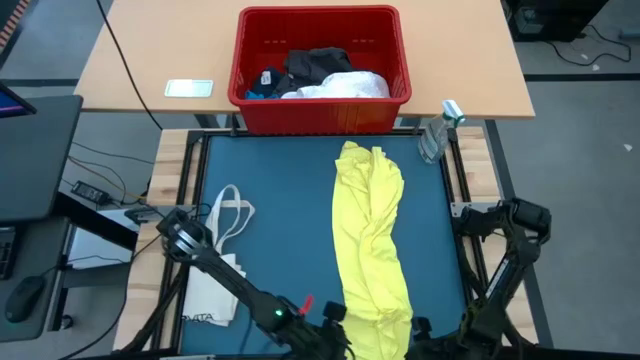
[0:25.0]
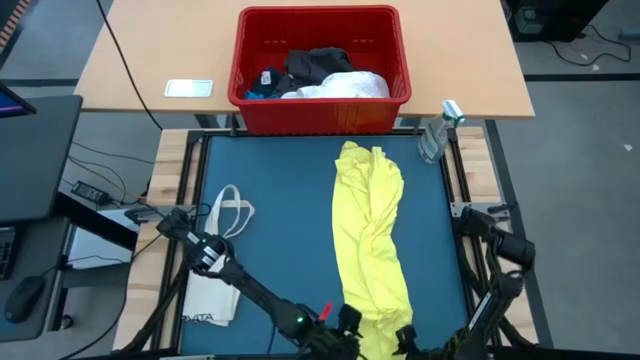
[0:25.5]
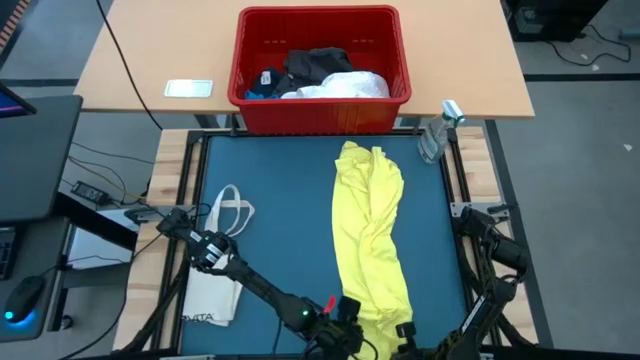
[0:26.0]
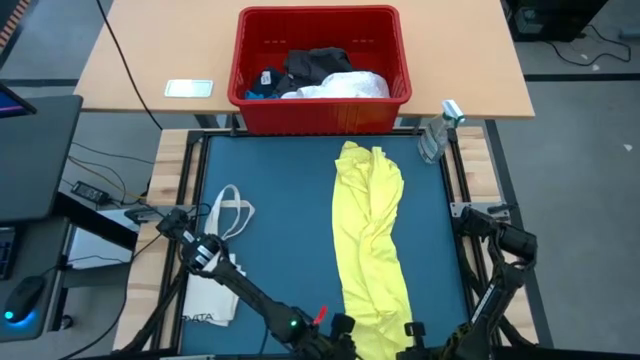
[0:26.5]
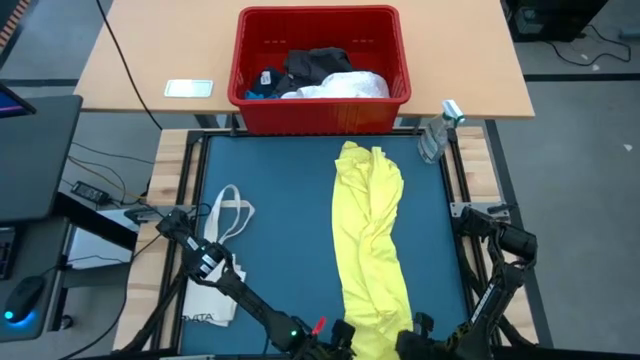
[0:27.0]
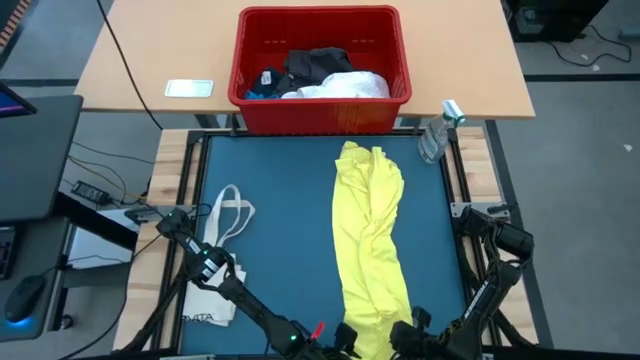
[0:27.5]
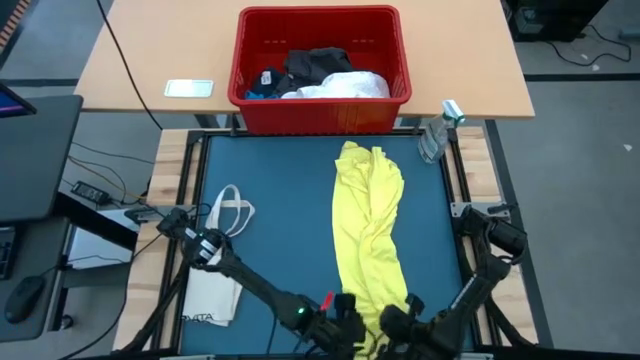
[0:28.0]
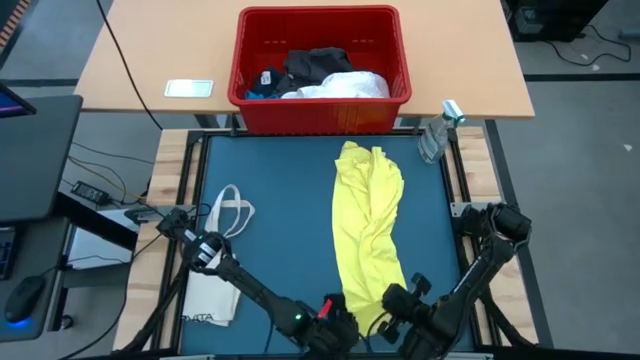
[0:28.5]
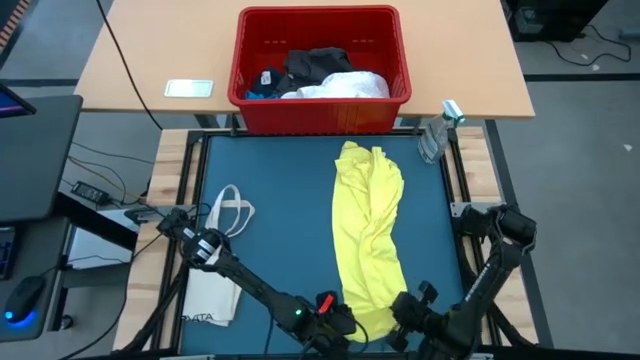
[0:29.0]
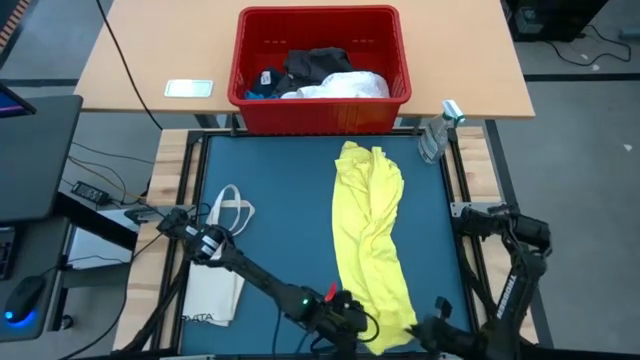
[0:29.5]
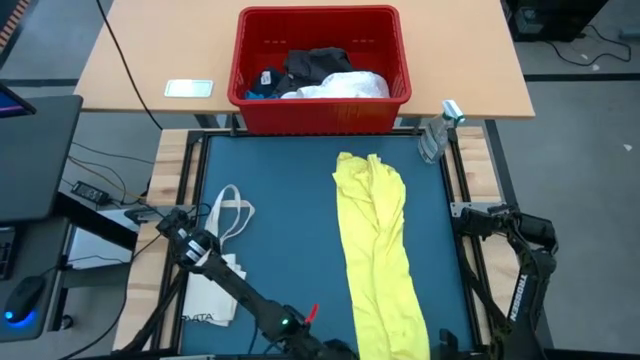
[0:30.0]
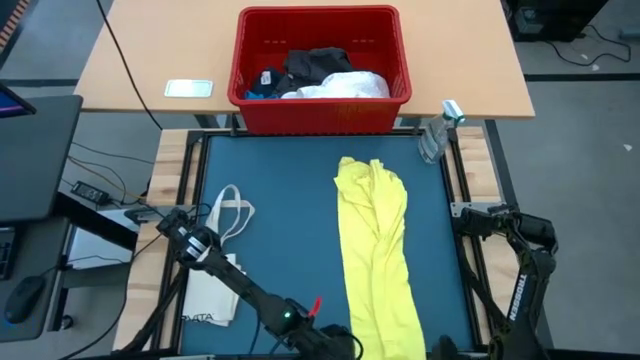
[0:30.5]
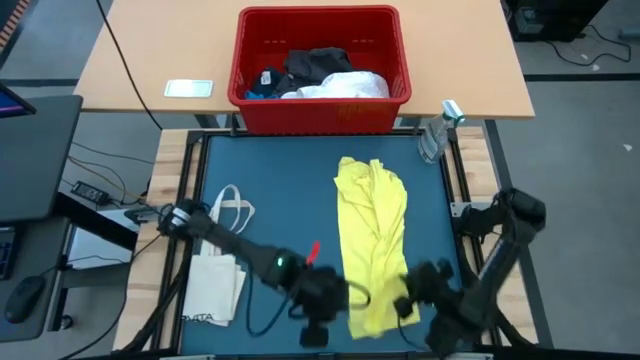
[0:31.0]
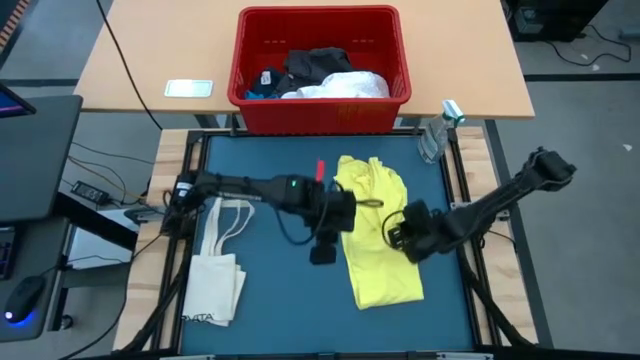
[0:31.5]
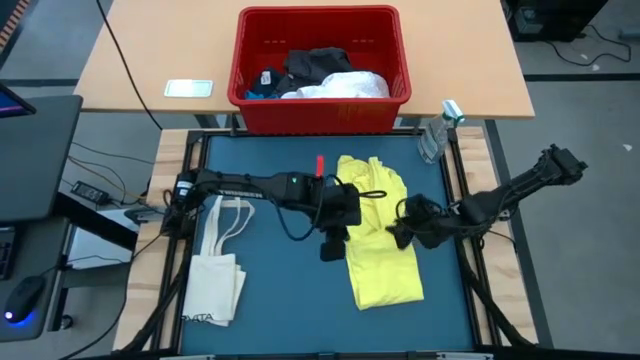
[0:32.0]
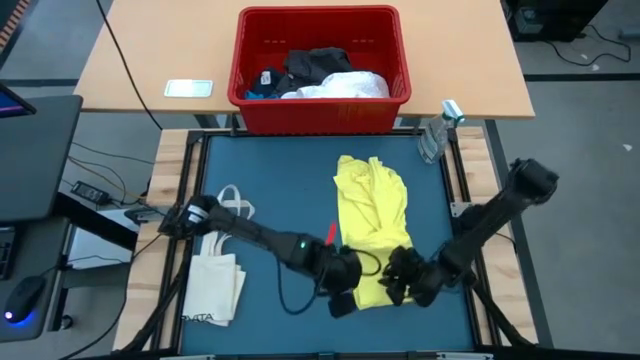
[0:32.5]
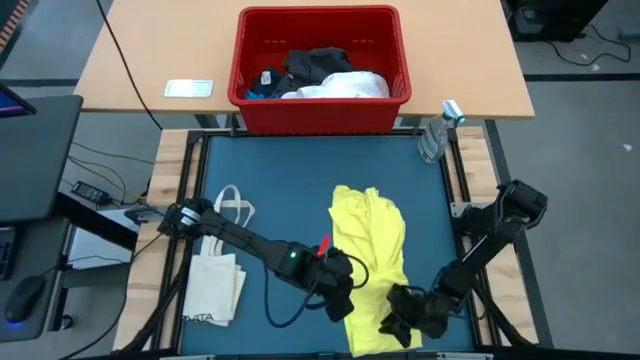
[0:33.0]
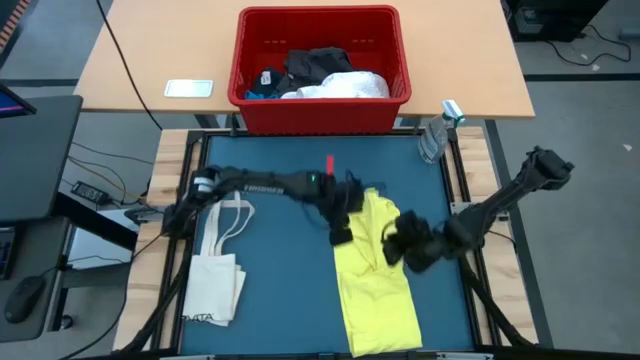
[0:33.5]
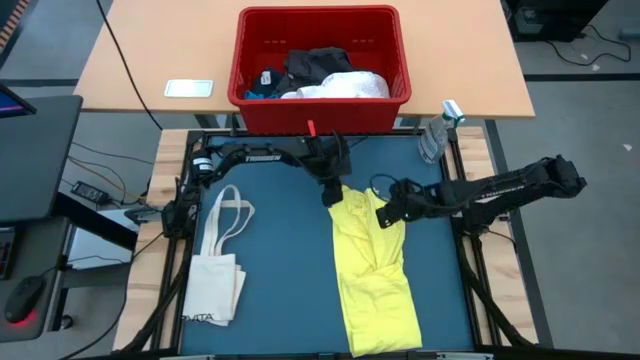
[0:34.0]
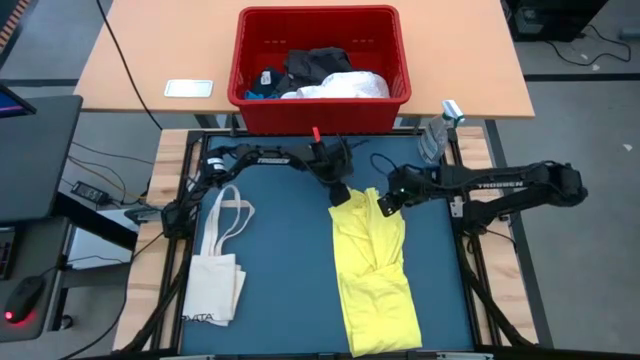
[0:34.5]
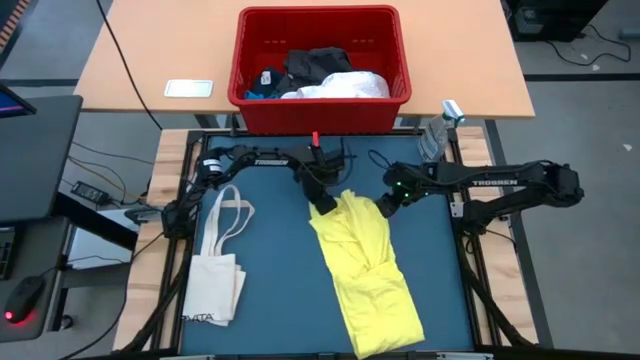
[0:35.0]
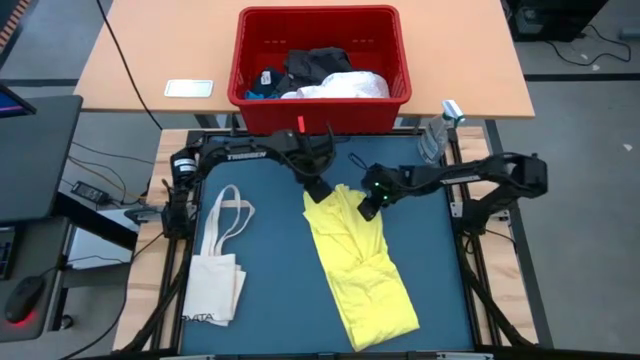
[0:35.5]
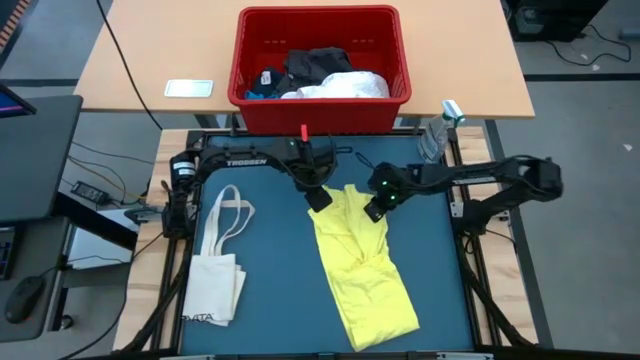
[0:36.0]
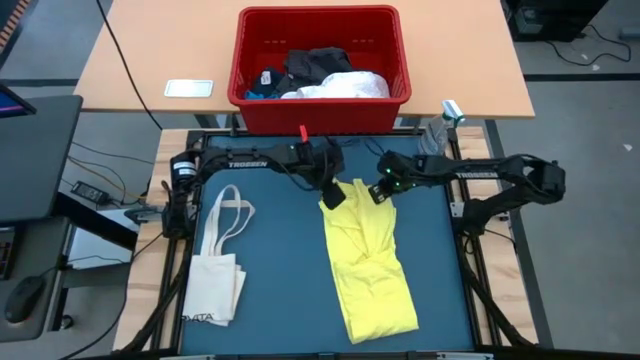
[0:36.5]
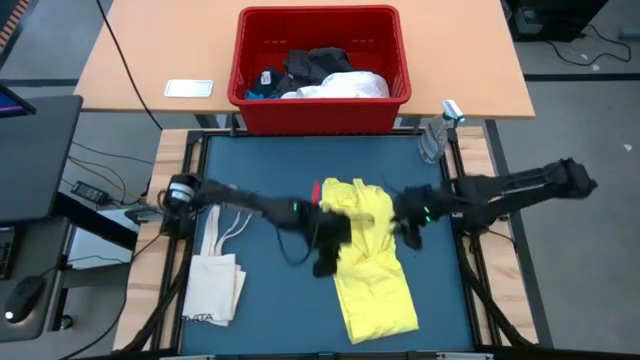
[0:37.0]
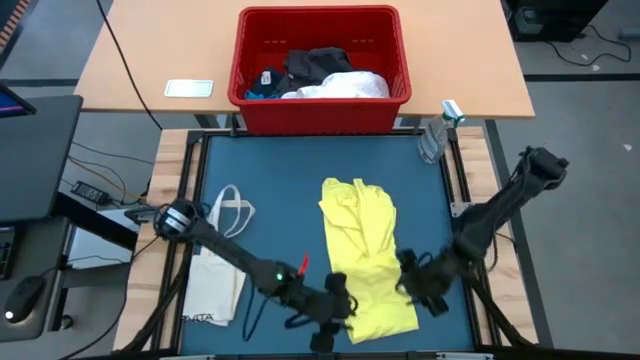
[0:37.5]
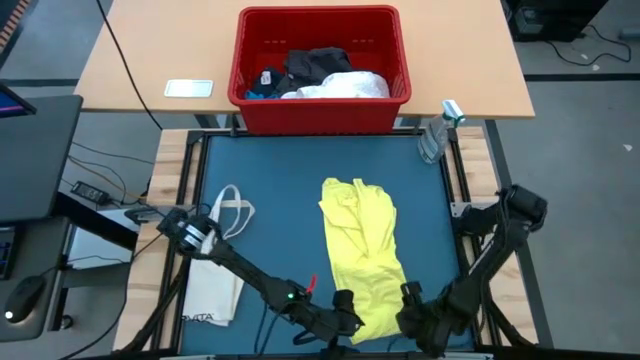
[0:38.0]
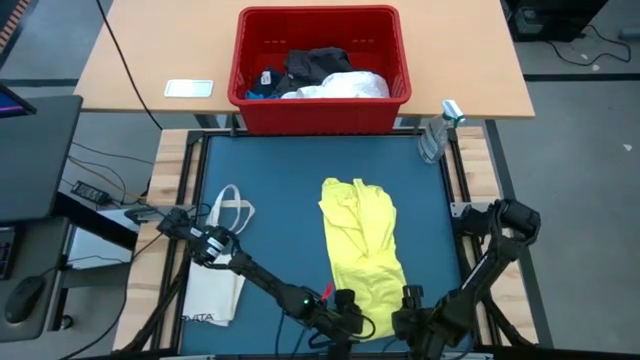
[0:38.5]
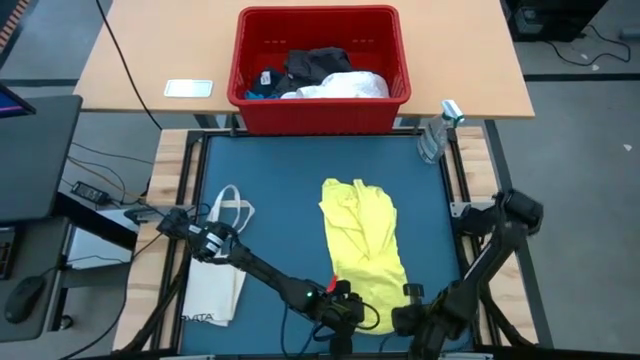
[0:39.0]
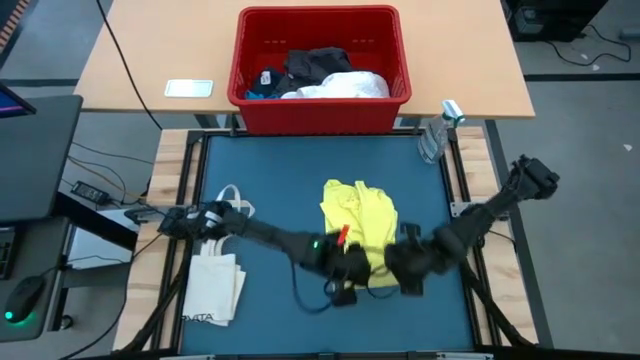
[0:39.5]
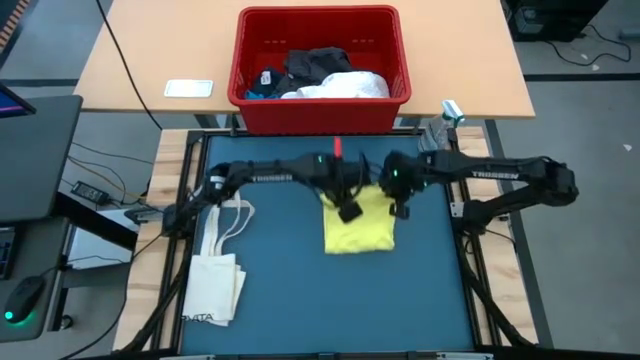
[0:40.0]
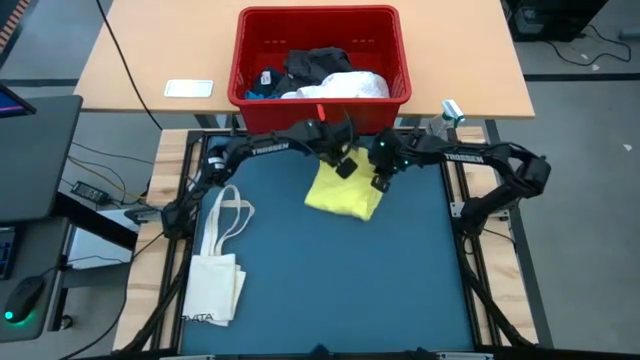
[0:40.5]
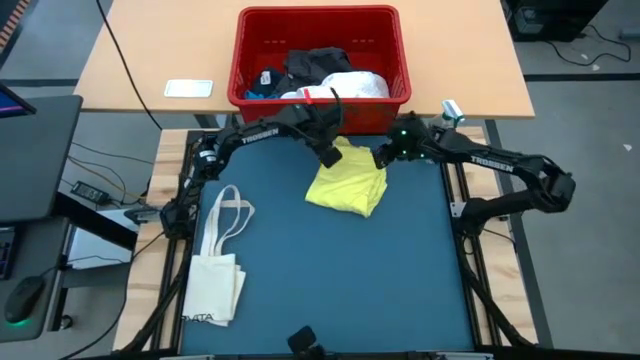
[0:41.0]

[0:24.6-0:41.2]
Task: Fold laundry
Fold the yellow shirt

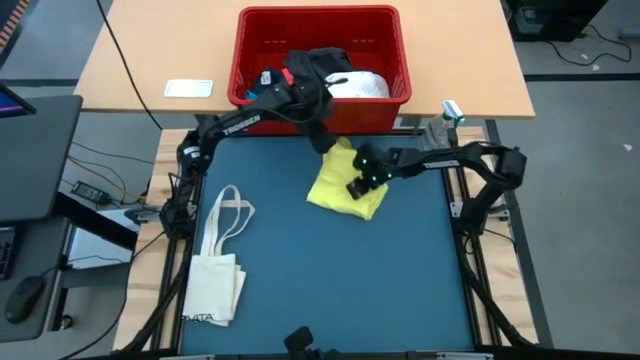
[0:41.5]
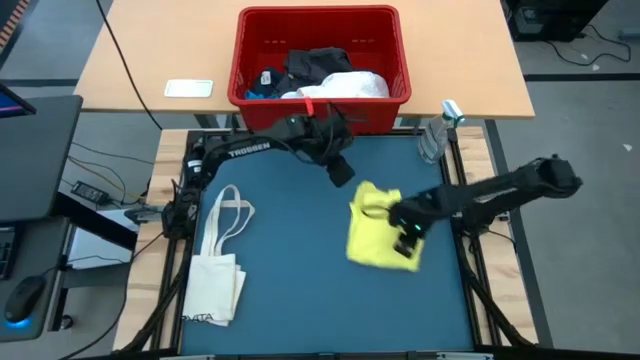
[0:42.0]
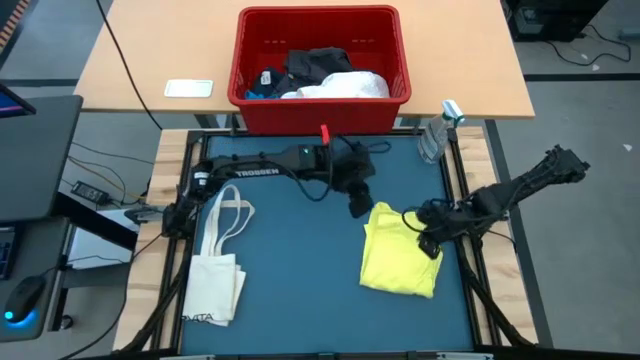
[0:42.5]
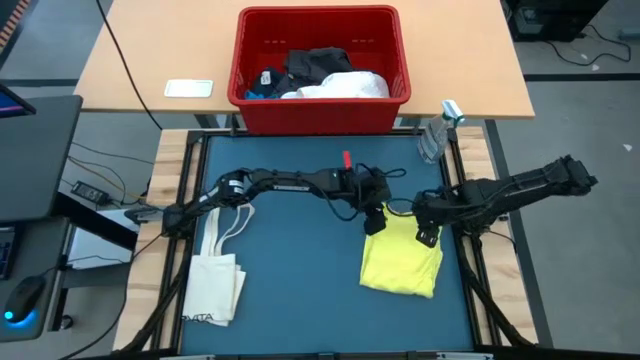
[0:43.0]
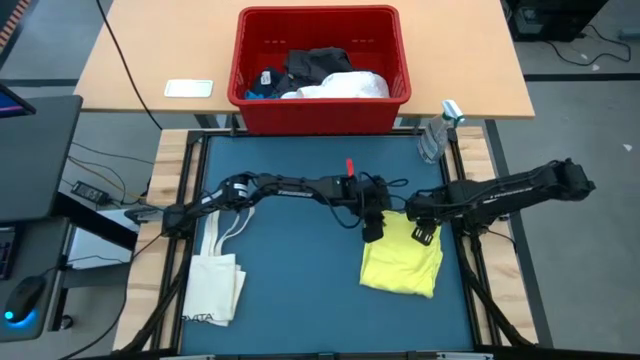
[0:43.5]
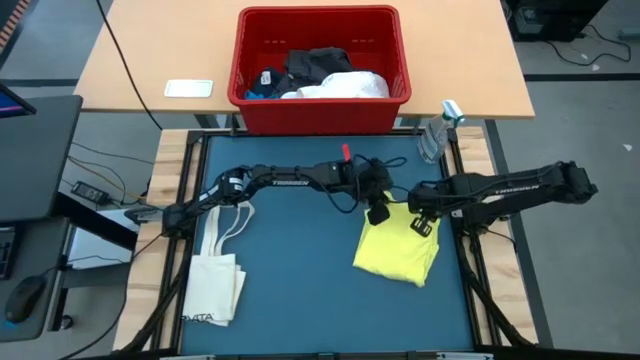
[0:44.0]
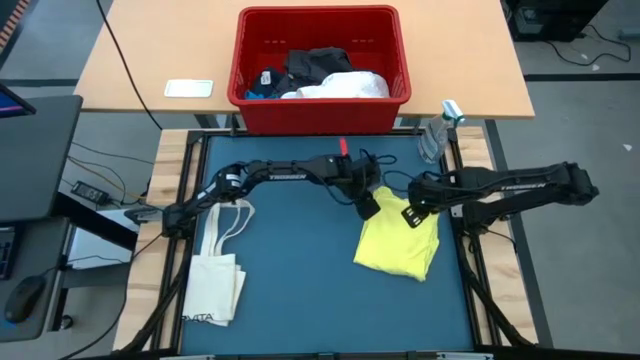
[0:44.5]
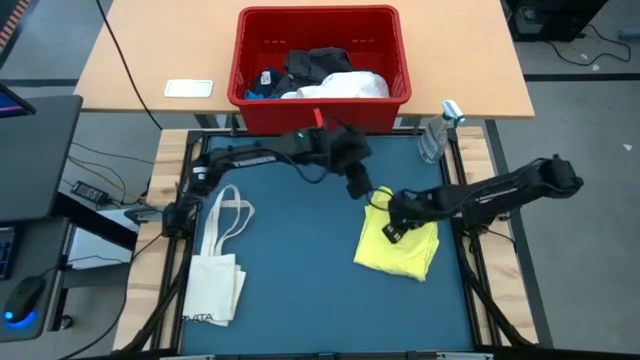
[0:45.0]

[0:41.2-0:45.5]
Move the yellow shirt to the bottom of the table

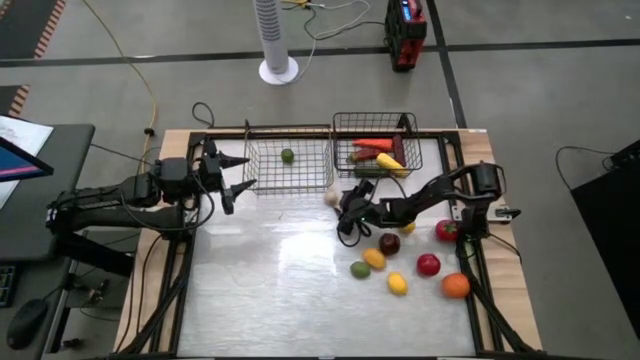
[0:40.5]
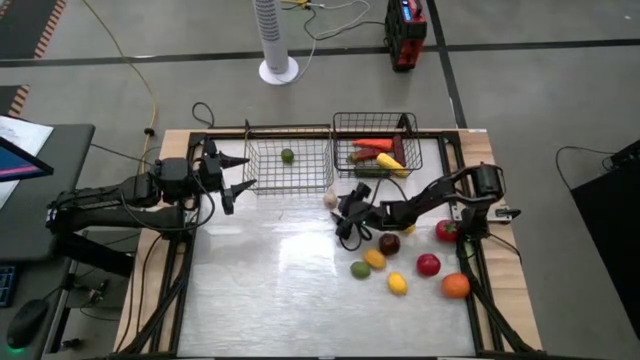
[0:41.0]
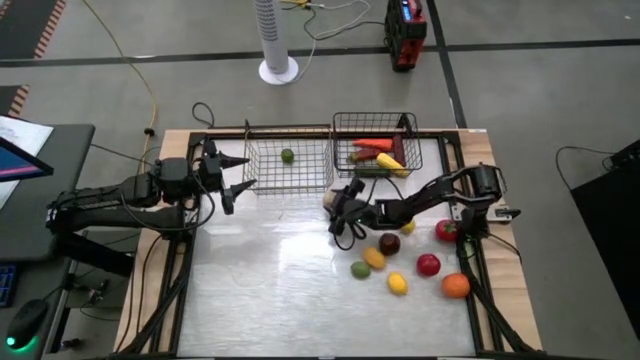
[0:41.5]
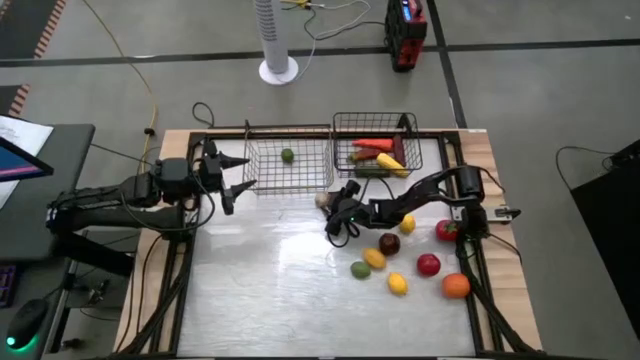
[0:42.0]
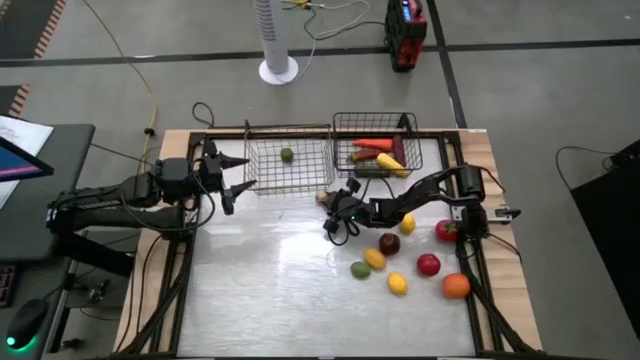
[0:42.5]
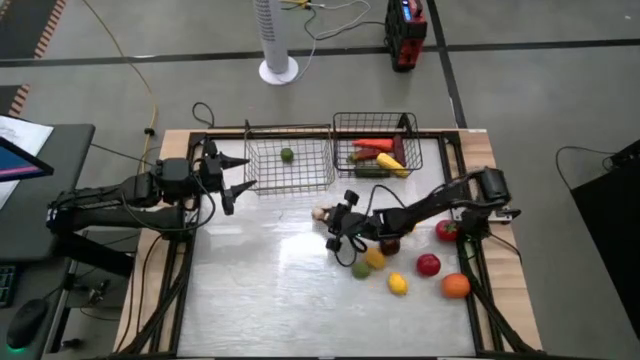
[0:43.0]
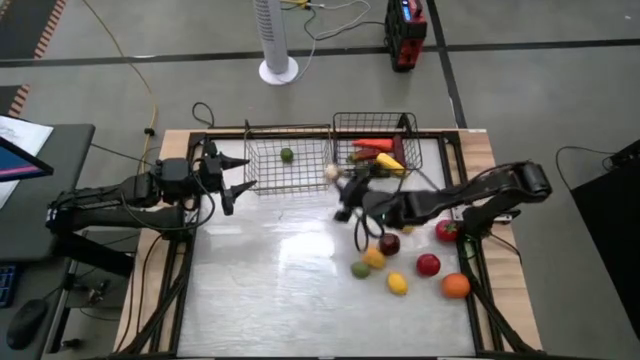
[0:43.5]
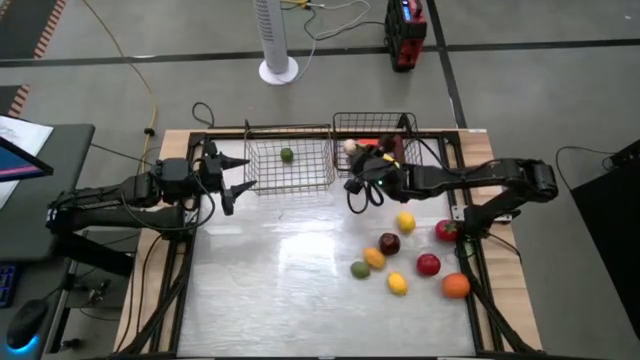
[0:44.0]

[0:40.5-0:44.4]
Task: Sort produce into baskets
Put the garlic into the right wire basket
